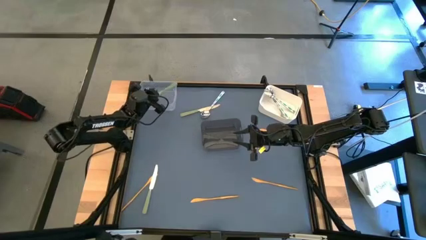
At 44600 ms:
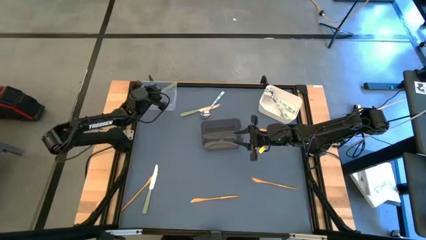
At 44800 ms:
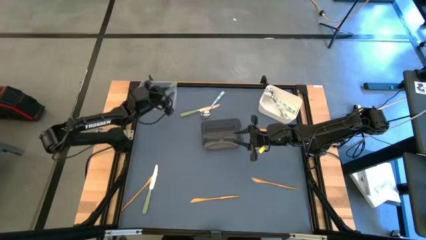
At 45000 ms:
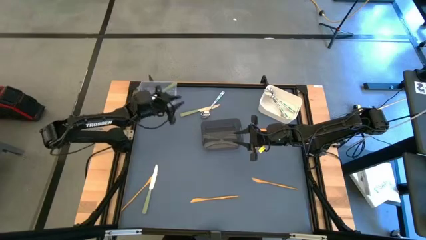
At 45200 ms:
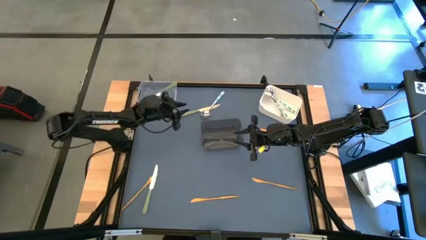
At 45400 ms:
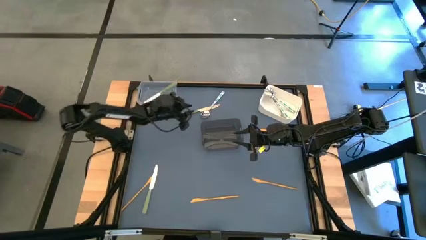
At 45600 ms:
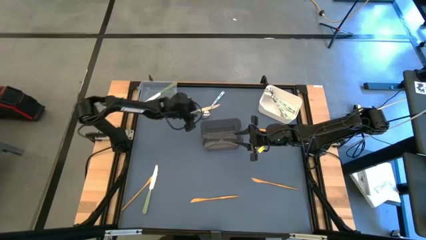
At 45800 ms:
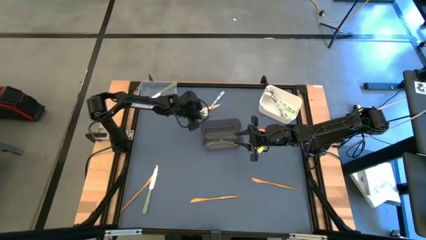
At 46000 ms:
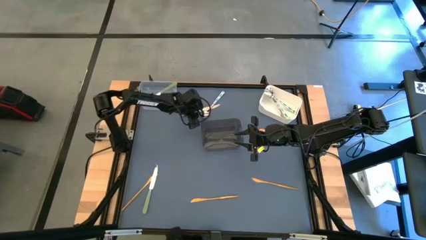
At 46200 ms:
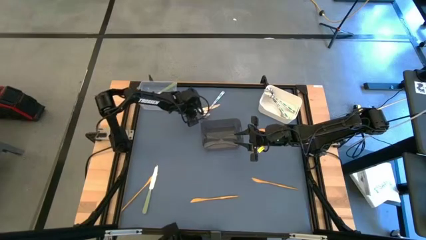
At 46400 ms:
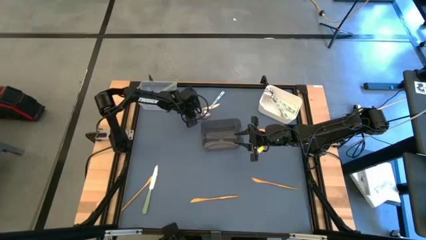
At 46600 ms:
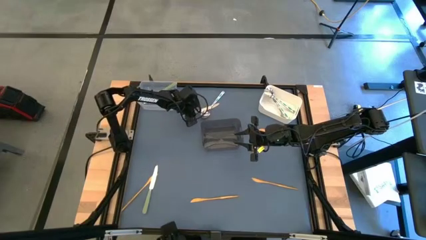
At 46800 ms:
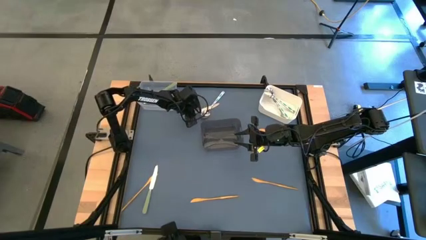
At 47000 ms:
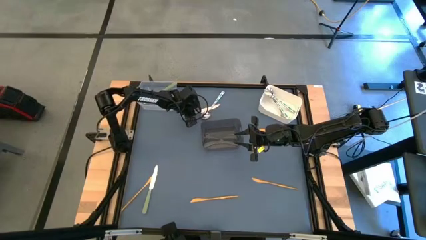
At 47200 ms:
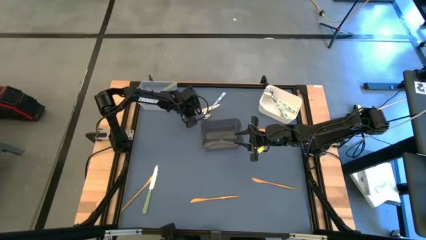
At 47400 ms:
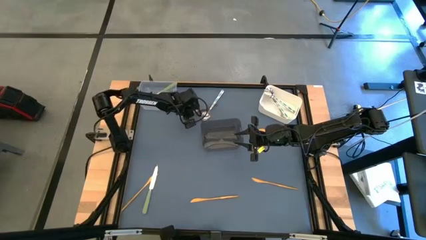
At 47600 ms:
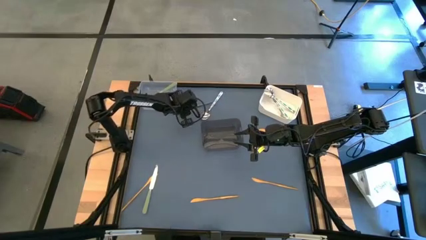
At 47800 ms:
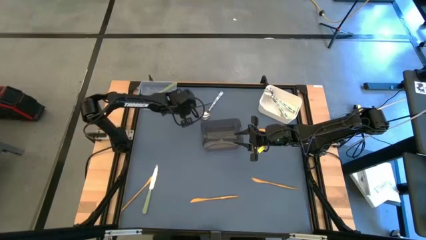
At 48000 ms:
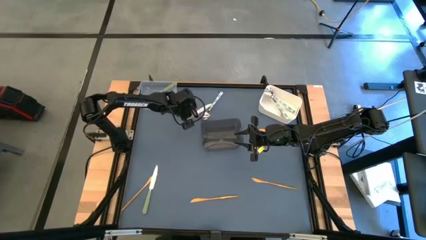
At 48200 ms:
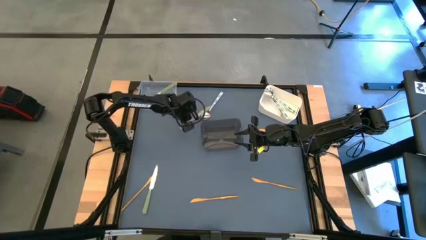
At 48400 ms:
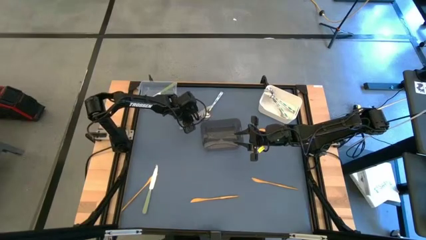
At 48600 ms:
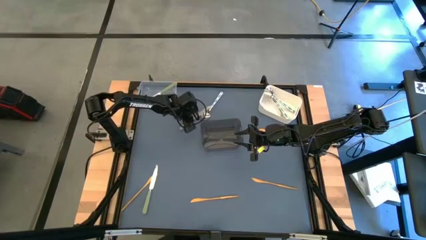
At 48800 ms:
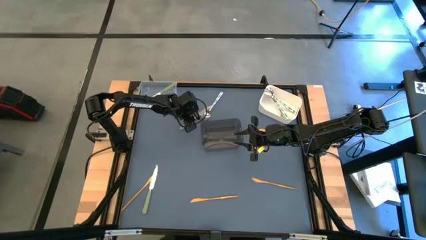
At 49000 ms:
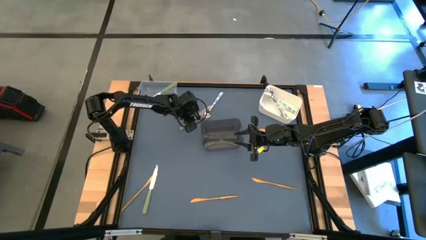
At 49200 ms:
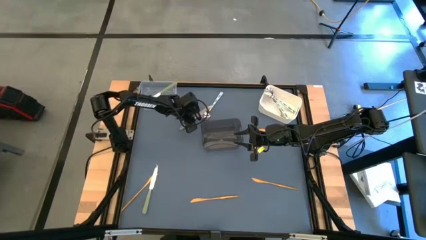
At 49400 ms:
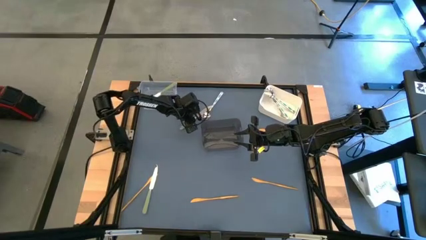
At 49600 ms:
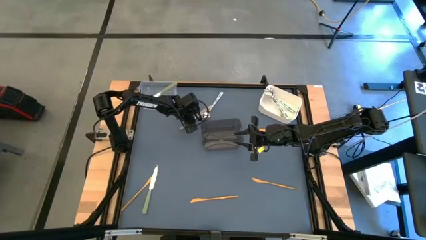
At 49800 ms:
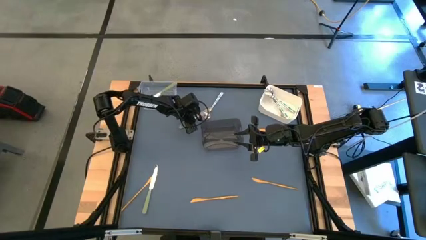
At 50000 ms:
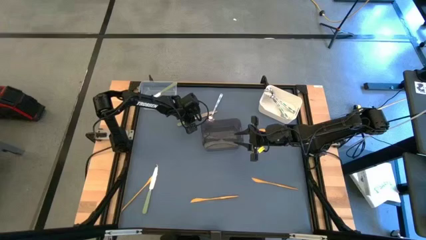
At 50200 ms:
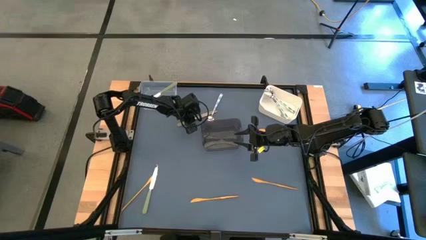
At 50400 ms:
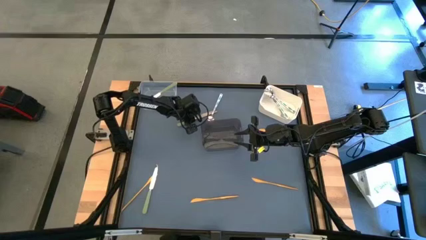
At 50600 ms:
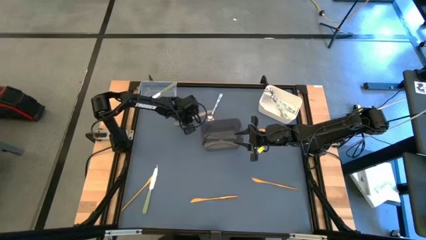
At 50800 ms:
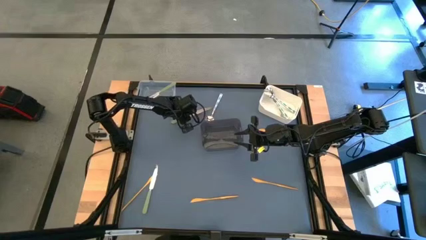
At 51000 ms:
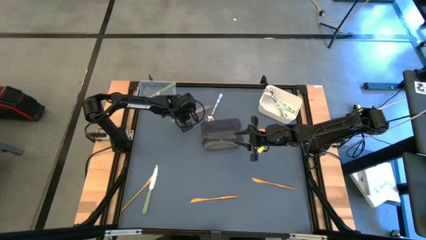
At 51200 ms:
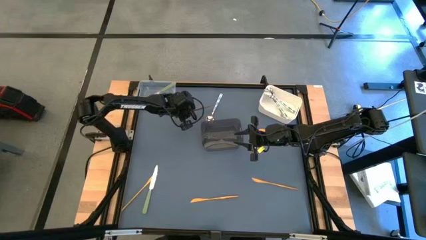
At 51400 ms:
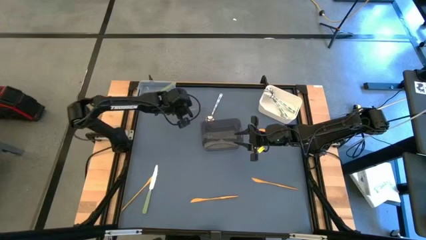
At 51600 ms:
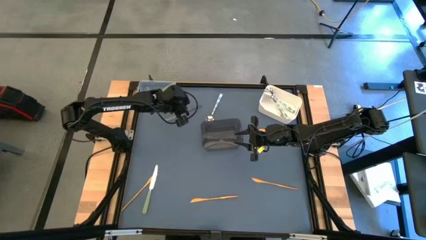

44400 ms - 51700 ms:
Task: Sort silverware by color (type)
Put the green knife into the transparent bin

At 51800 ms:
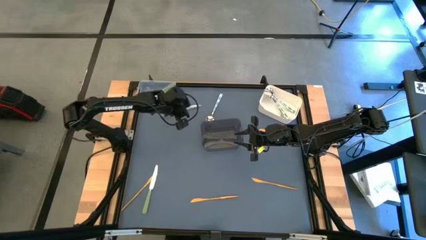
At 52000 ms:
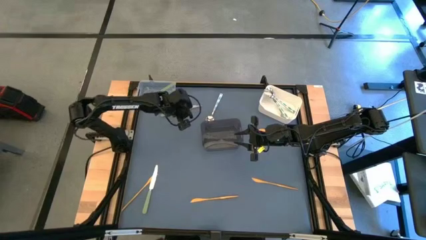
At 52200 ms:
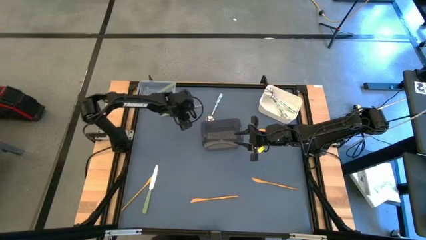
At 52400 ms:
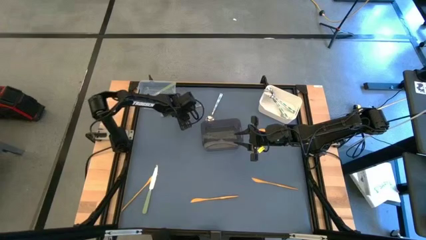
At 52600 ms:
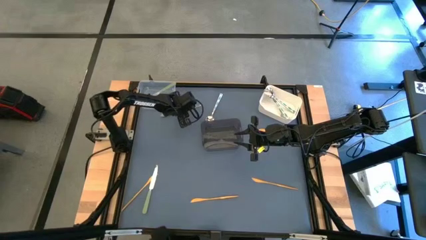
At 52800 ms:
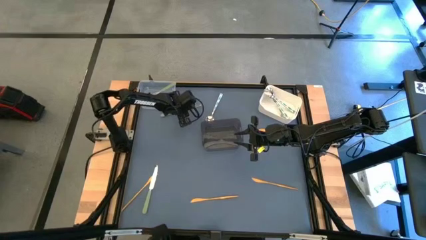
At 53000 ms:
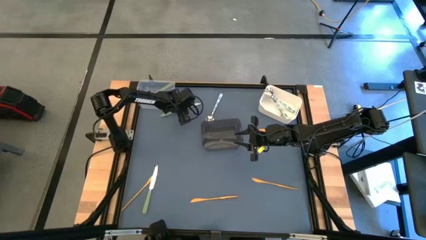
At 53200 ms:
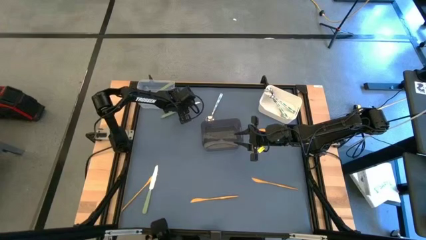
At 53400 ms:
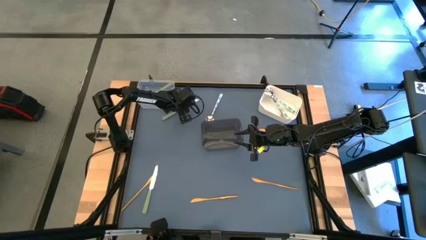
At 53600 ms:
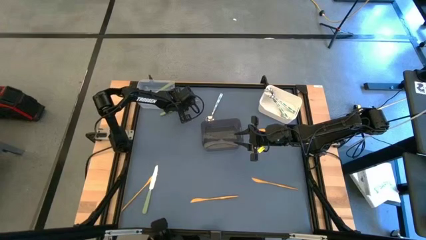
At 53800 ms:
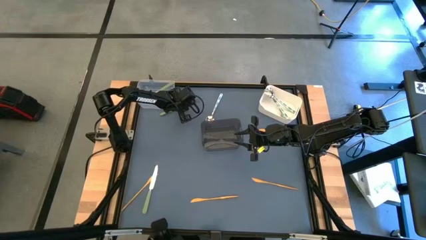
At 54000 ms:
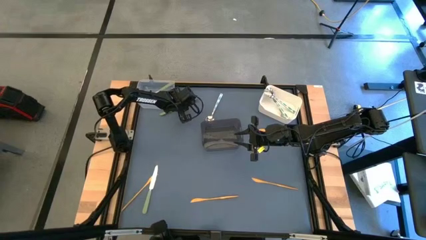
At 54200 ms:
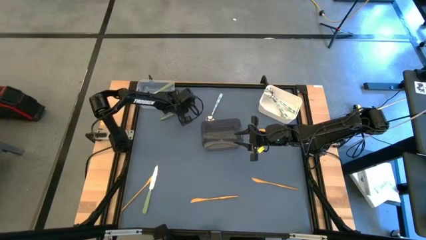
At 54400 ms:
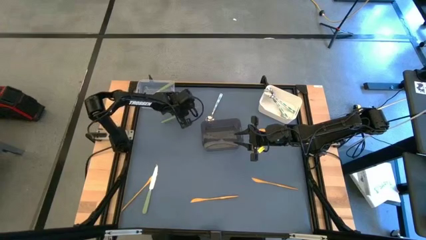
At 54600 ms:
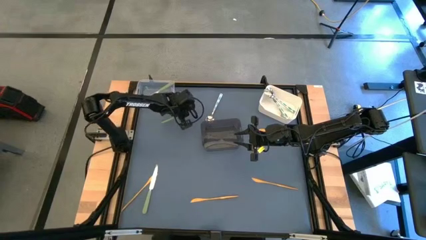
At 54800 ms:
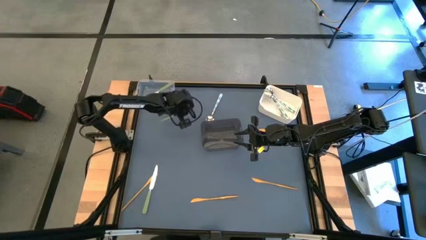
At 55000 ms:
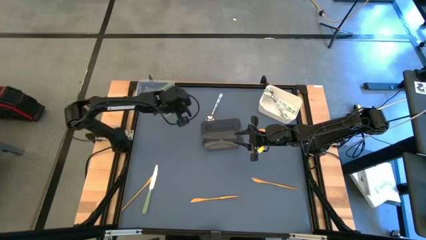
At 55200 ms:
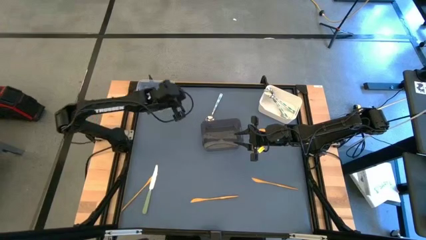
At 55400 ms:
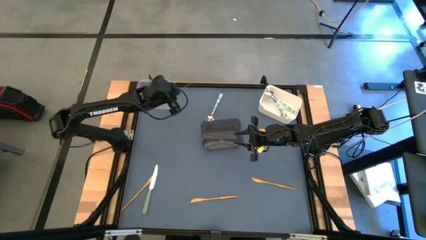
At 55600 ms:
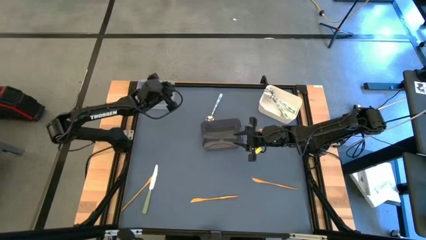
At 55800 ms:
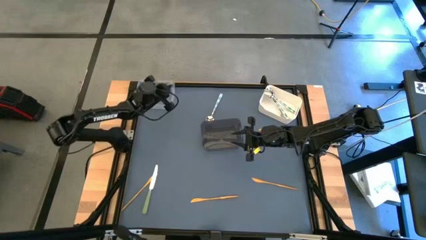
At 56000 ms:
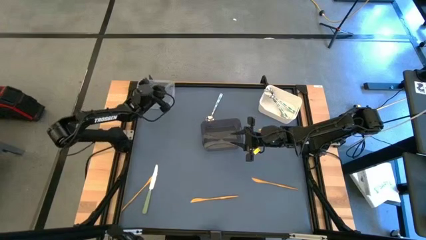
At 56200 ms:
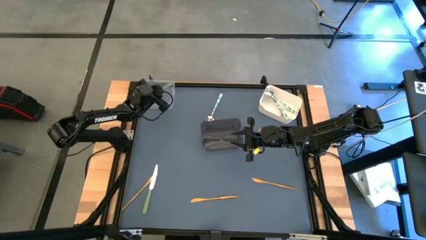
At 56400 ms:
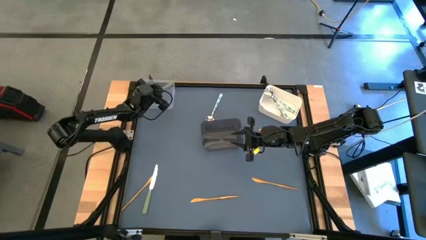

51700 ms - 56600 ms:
Put the green knife into the transparent bin

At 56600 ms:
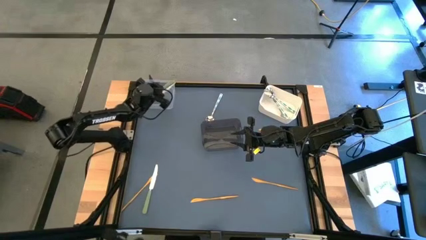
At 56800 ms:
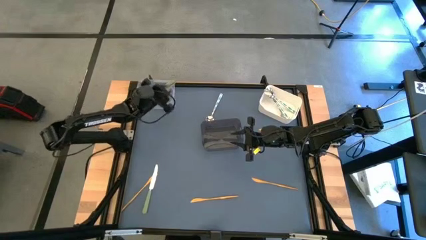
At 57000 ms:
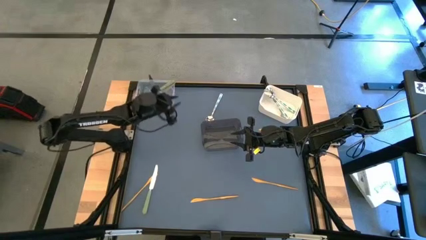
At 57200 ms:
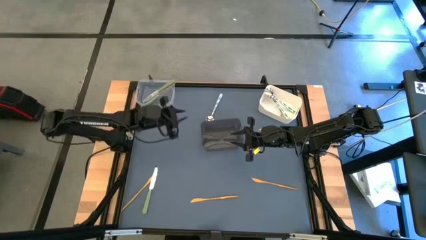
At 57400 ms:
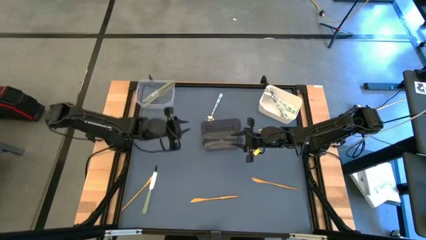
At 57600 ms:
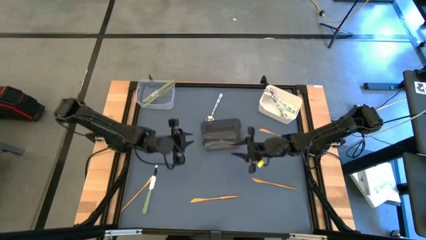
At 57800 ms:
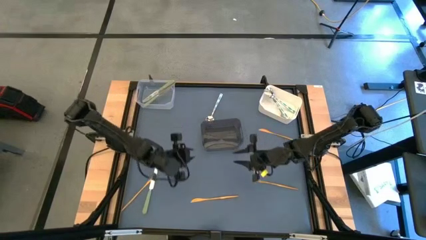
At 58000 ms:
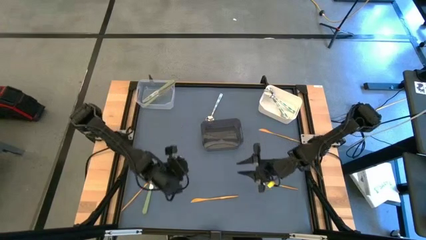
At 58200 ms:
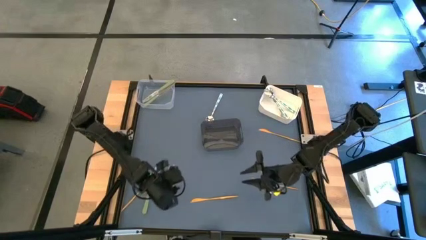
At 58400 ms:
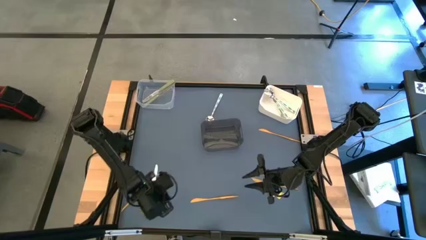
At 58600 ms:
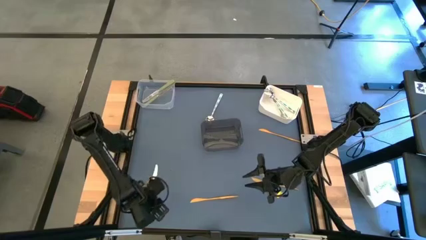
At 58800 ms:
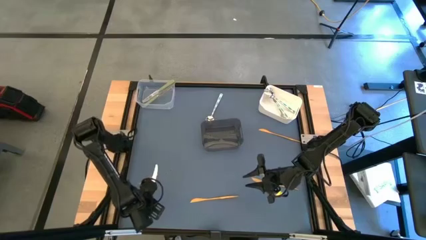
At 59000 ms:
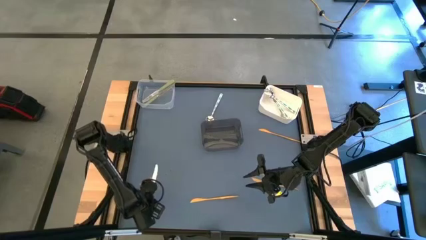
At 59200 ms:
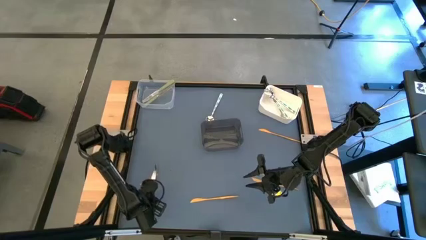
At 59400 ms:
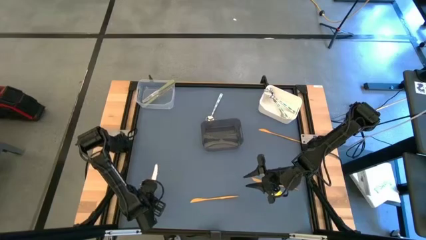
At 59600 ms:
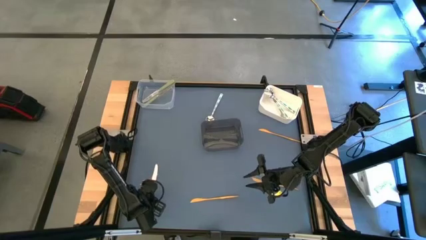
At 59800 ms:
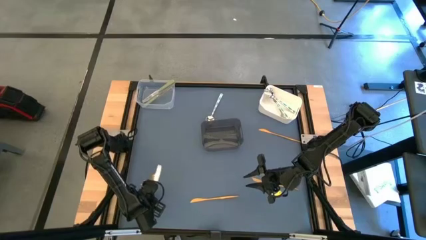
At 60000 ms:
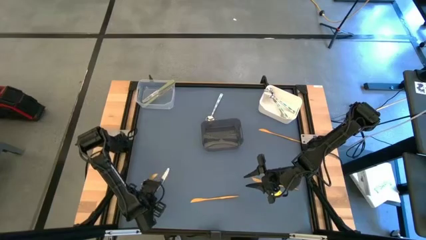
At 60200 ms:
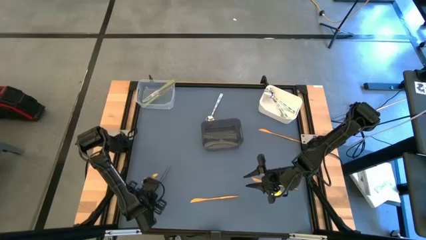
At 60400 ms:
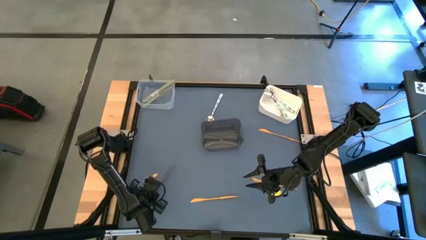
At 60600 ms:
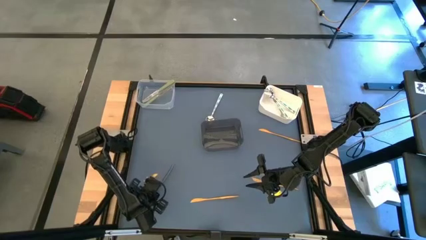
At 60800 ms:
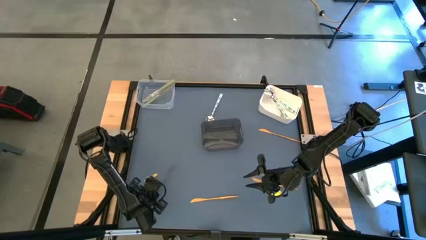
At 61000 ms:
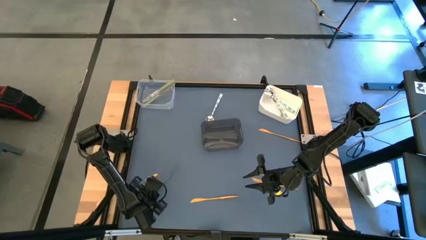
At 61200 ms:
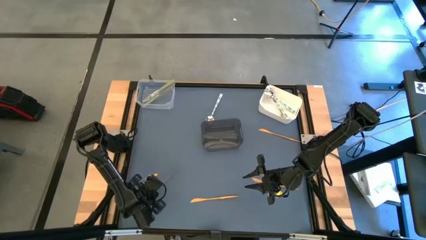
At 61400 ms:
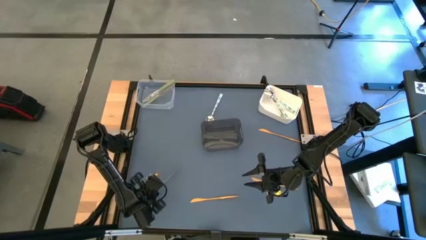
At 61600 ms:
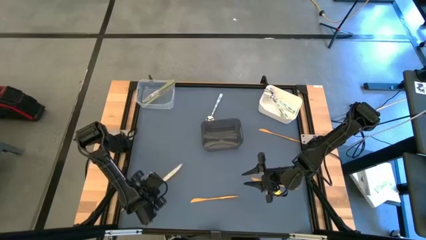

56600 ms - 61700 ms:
Put the green knife into the transparent bin
